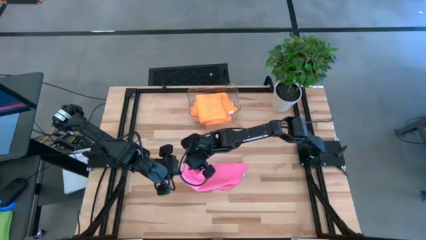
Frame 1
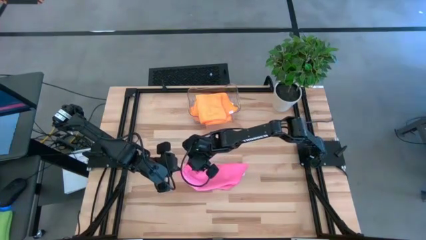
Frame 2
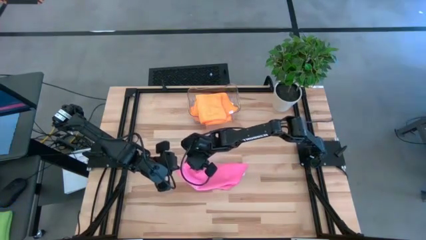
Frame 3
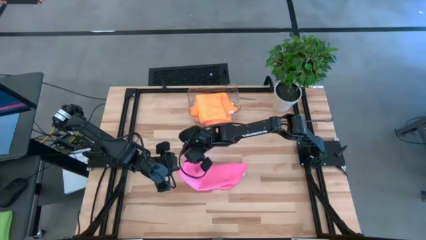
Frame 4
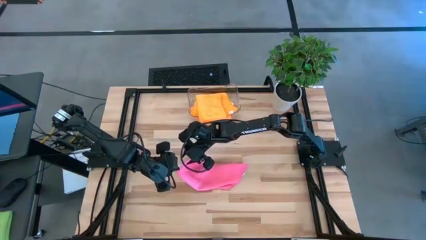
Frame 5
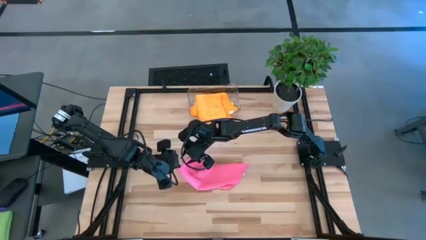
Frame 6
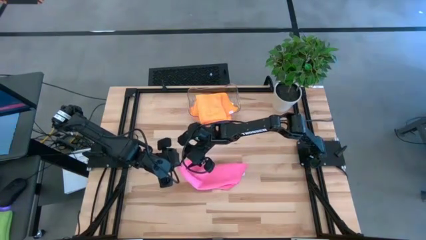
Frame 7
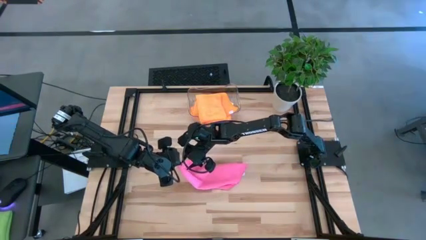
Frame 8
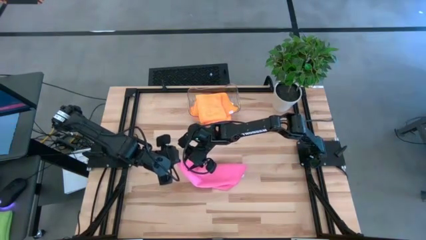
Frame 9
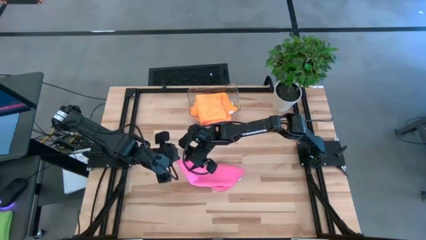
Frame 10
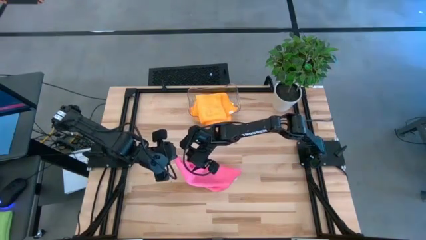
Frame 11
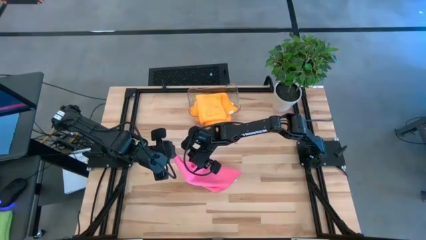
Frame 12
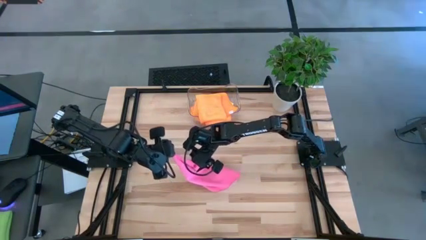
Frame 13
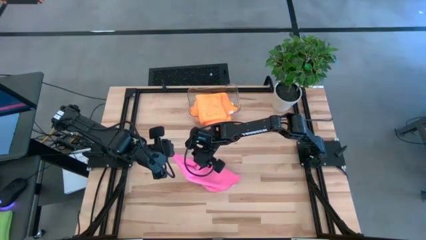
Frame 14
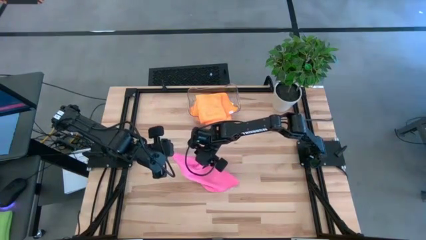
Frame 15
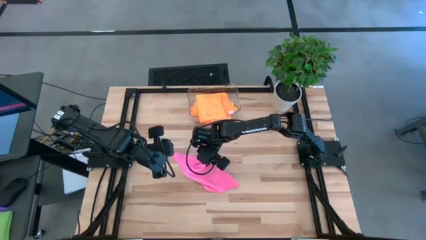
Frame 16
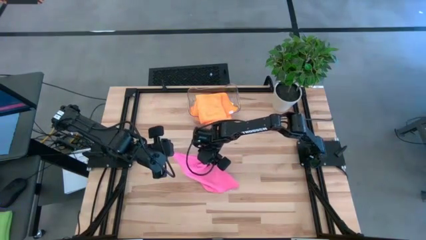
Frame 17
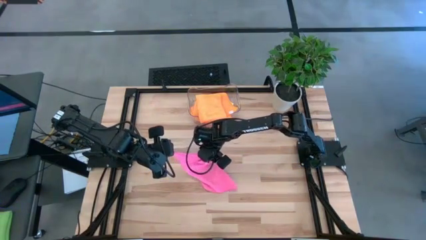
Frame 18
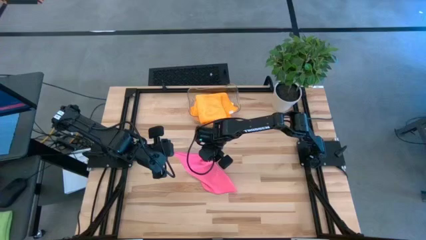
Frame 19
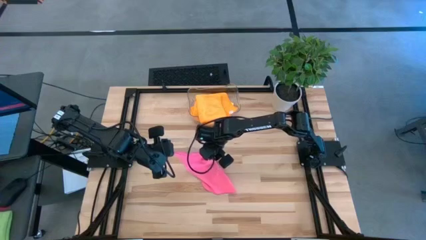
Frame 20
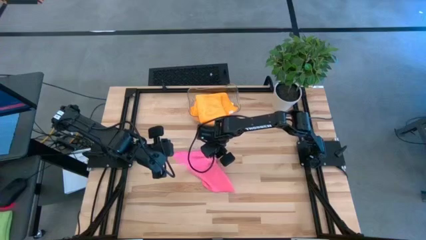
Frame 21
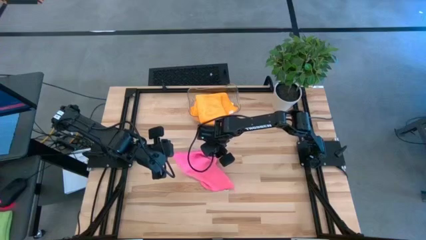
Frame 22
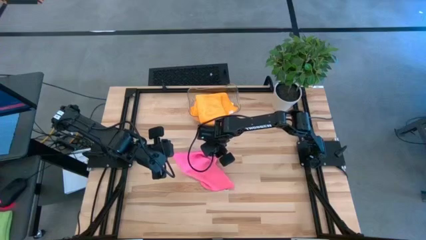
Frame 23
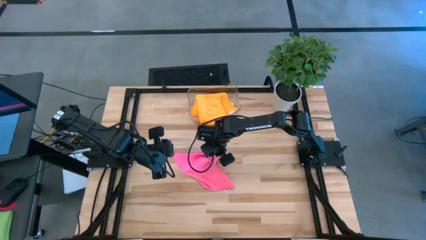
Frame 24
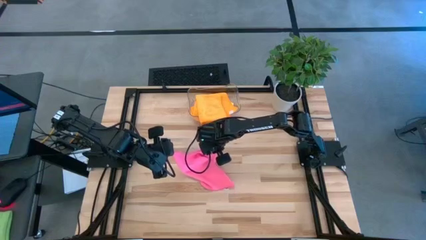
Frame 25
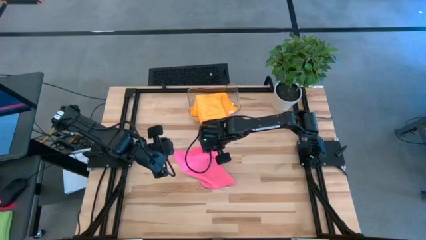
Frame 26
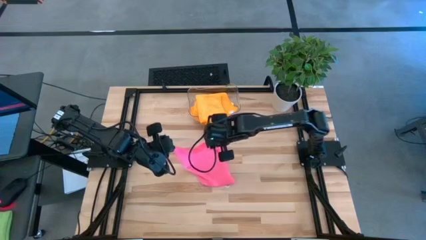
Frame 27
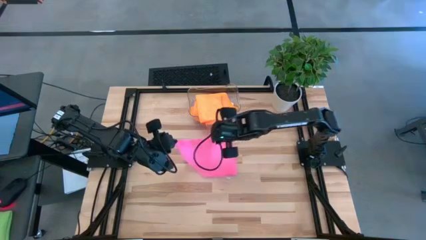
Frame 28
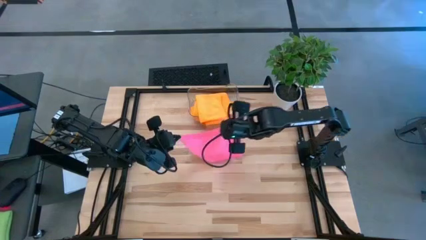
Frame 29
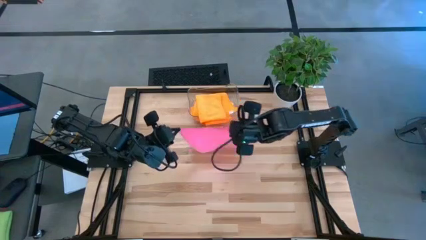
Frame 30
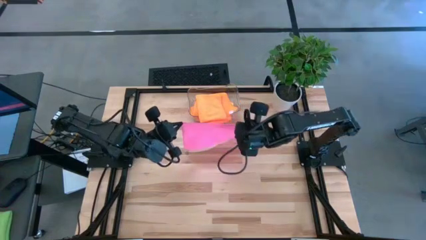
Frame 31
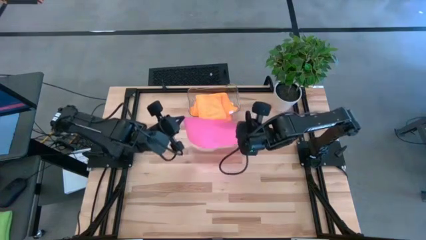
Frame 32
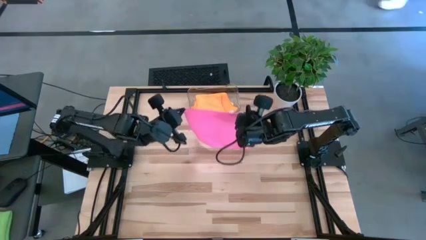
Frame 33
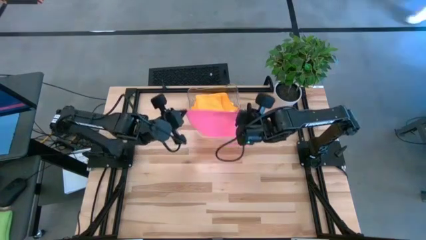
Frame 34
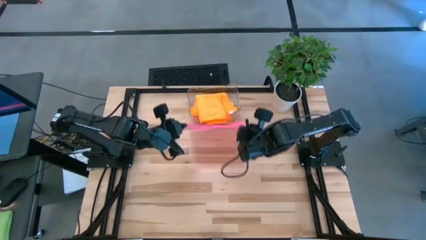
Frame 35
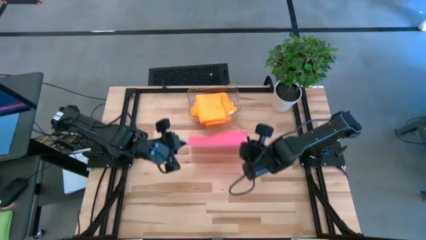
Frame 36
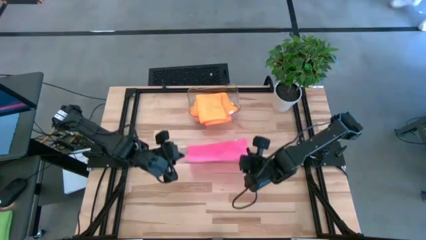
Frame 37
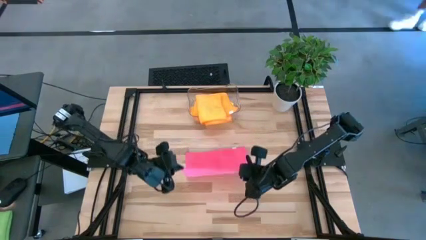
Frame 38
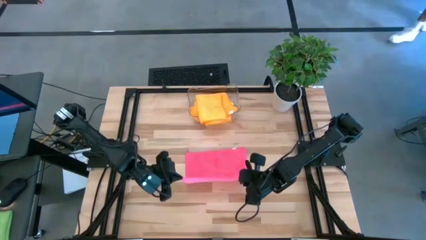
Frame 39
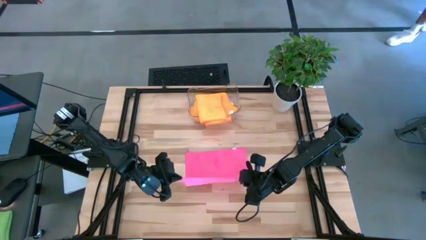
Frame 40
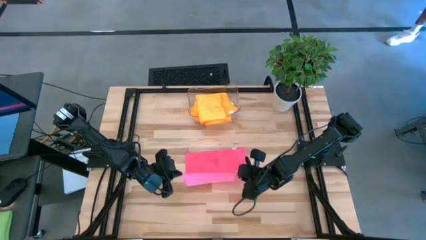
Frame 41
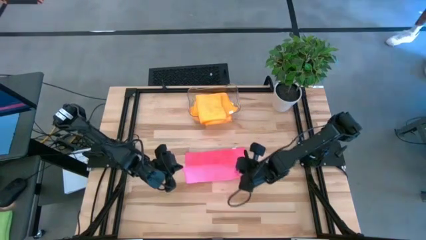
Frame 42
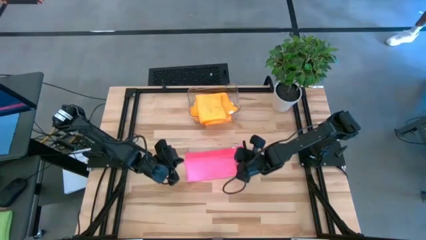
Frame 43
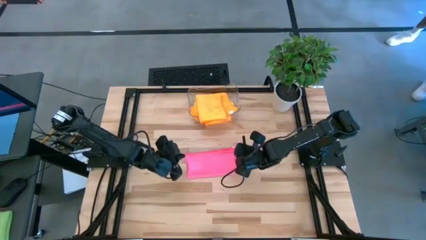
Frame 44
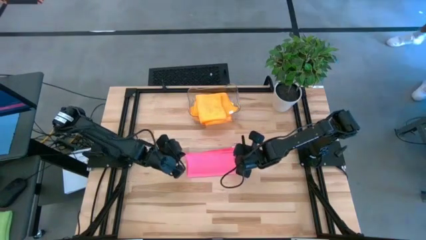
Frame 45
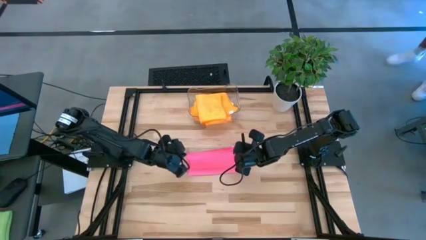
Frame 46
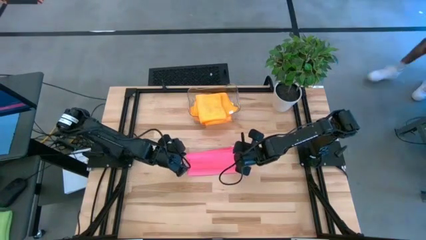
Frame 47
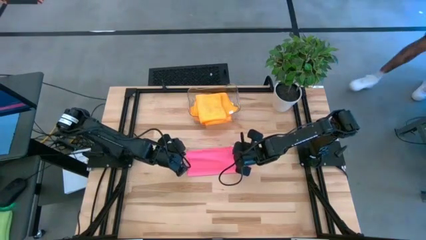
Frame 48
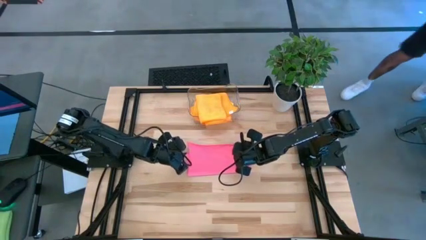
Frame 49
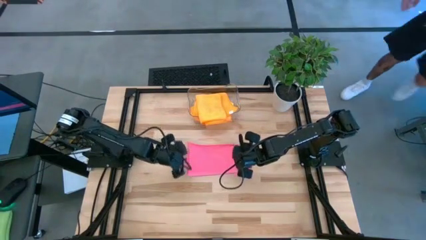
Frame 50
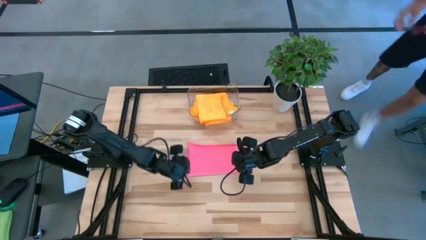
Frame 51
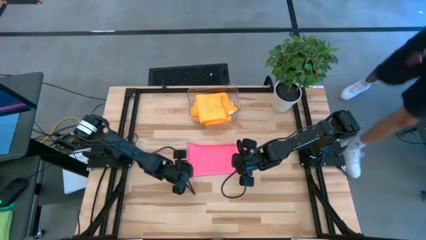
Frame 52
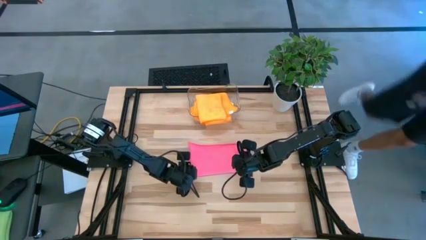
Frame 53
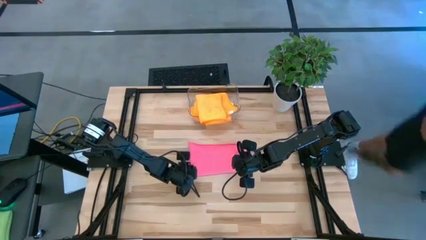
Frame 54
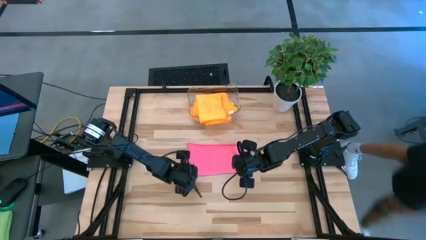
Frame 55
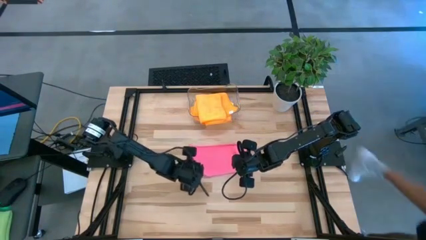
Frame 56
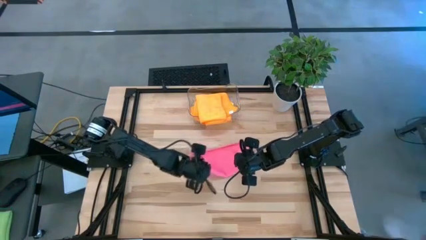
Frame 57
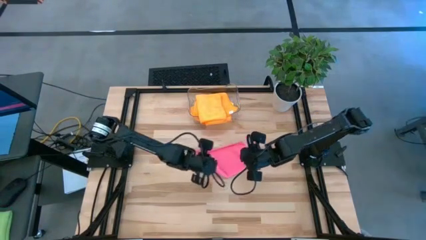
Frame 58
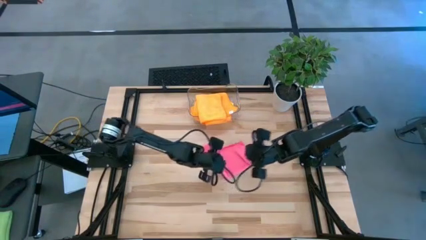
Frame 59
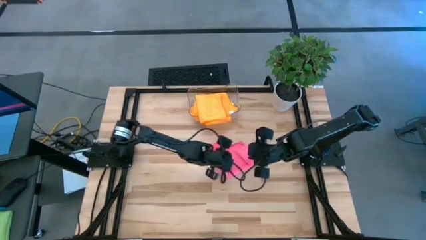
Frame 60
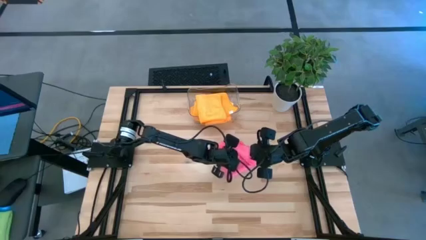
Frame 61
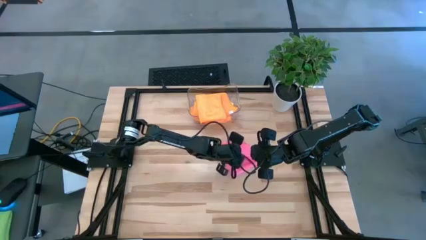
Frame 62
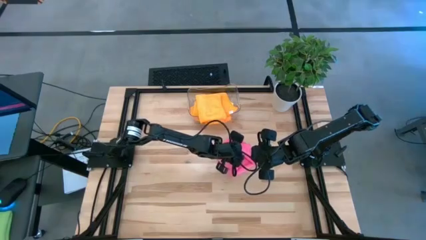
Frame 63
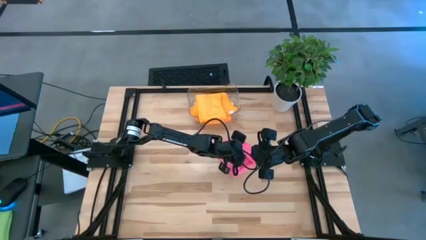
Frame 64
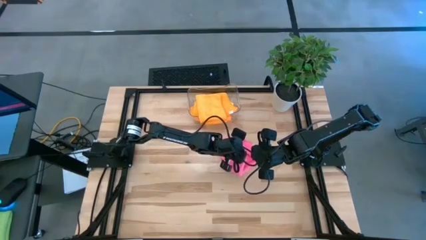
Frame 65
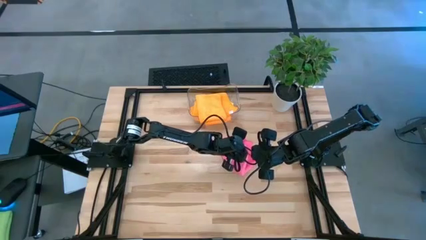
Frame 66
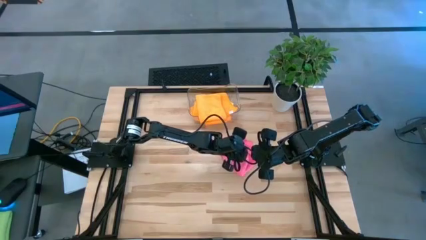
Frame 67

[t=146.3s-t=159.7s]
Task: Fold microfiber towels
Fold the pink towel

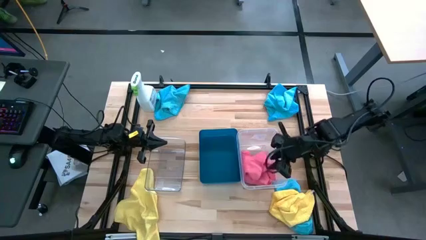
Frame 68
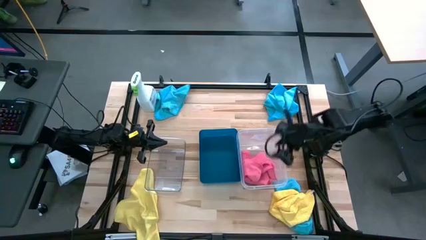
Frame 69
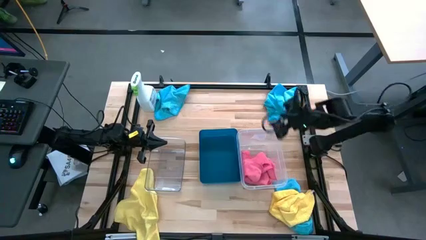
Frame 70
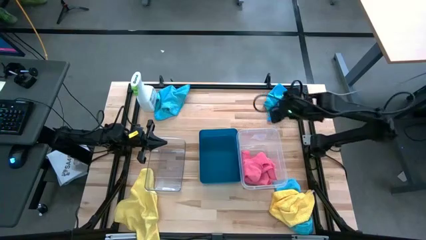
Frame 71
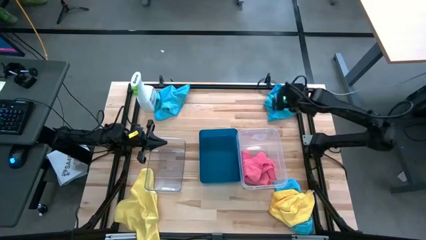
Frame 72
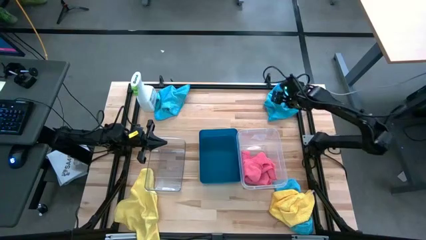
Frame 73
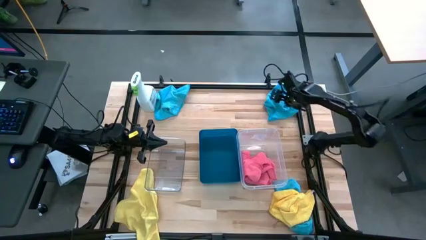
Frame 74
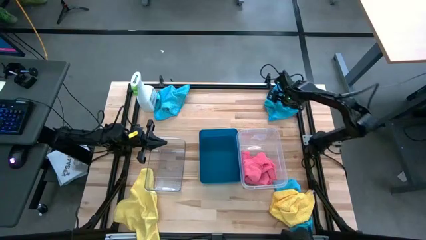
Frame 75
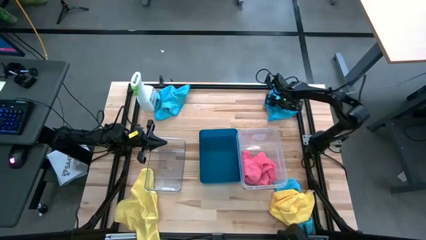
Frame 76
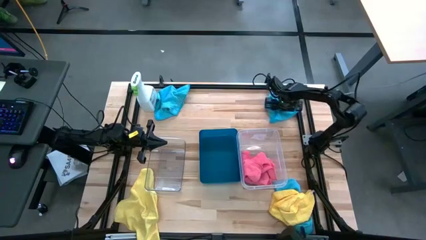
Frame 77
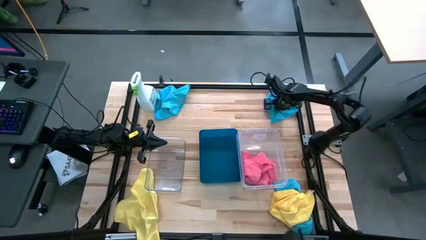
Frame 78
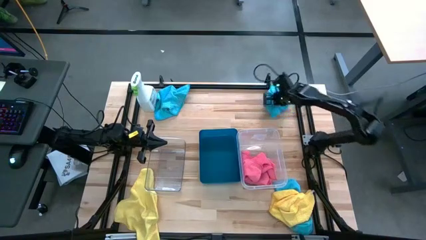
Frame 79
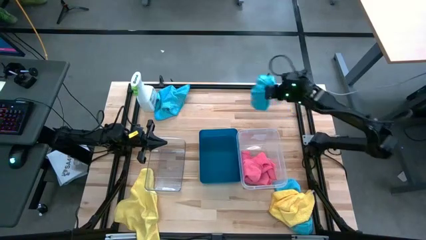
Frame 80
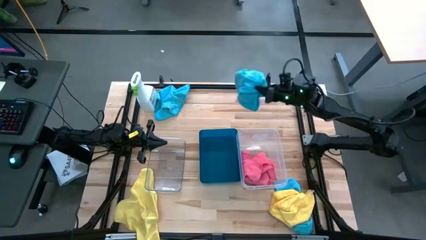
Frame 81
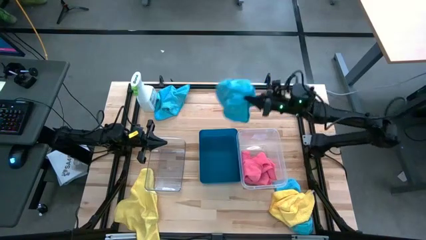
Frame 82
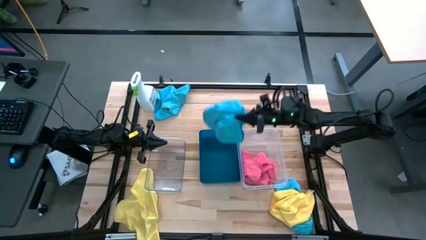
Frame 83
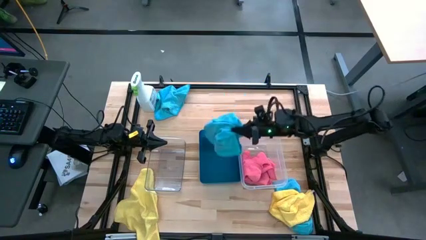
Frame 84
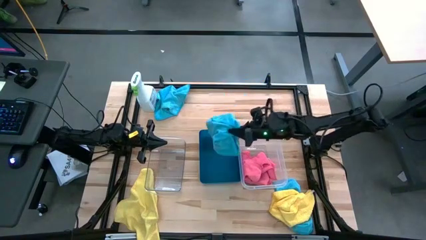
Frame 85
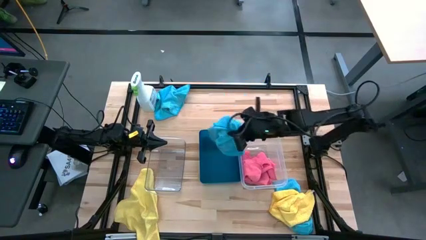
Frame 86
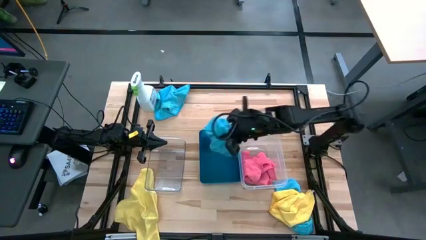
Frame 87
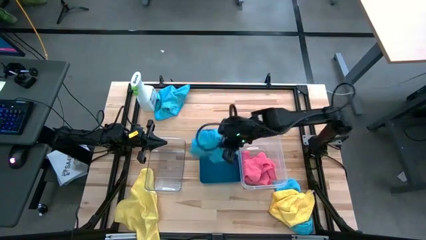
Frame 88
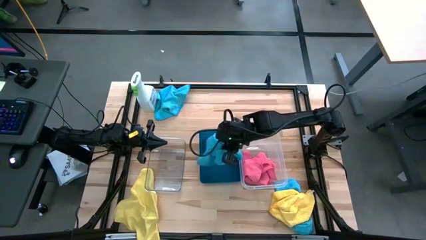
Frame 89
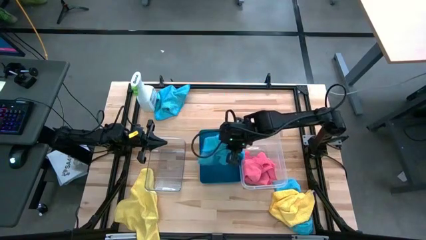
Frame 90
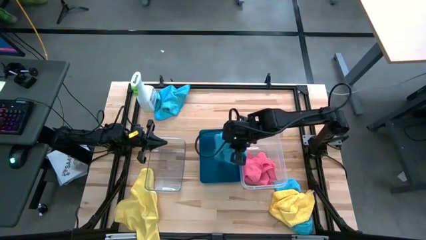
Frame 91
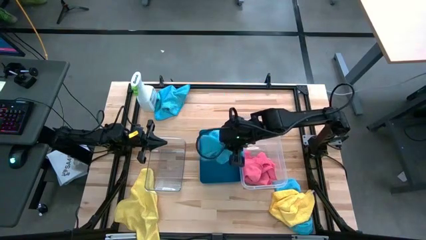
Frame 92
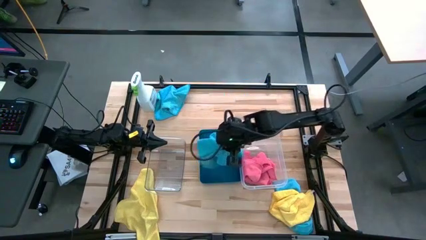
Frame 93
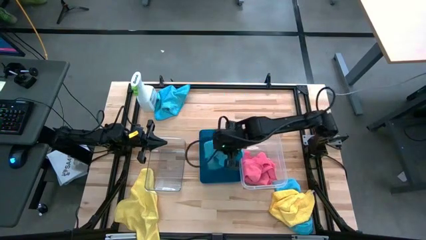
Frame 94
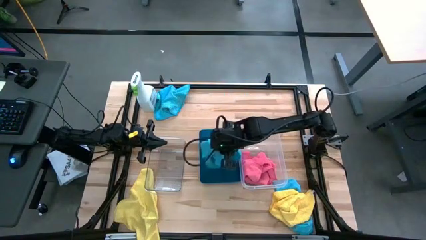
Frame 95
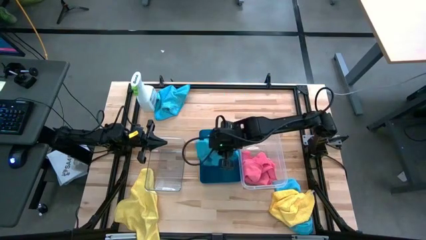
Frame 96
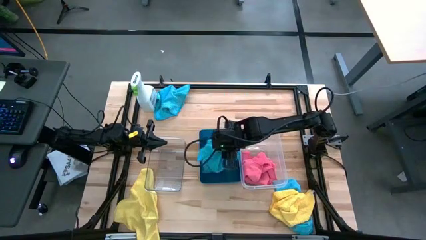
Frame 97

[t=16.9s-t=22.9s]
Task: Sort microfiber towel by color & place in baskets
Put the top right blue microfiber cloth into the dark blue bin
